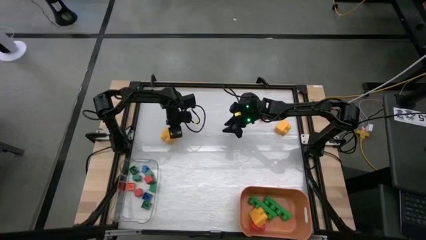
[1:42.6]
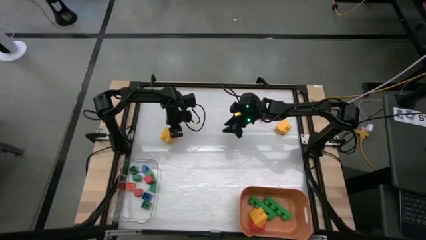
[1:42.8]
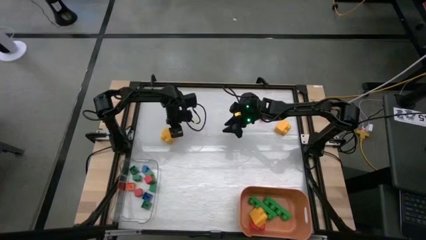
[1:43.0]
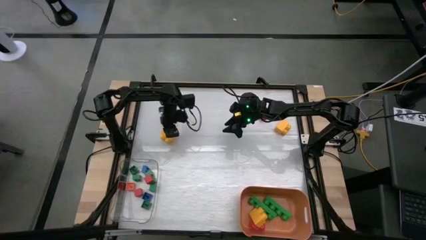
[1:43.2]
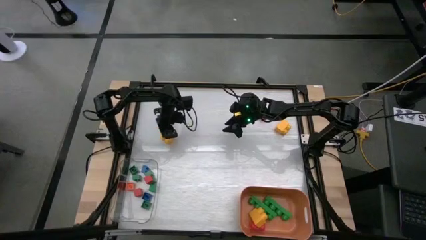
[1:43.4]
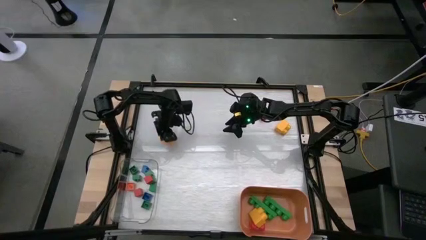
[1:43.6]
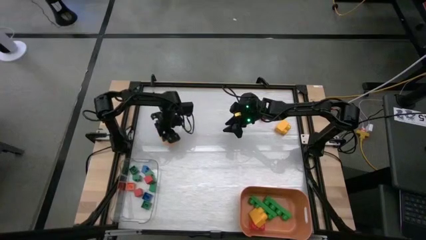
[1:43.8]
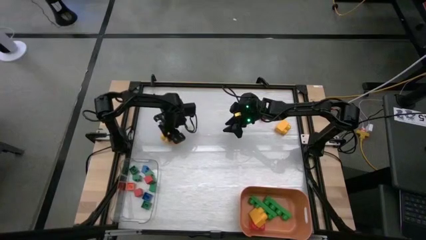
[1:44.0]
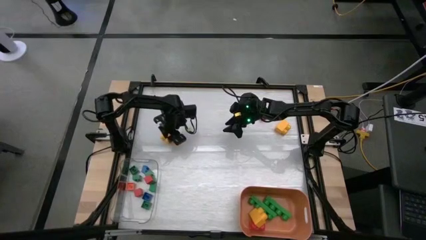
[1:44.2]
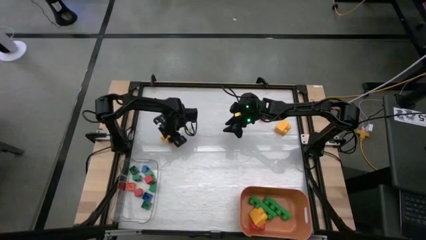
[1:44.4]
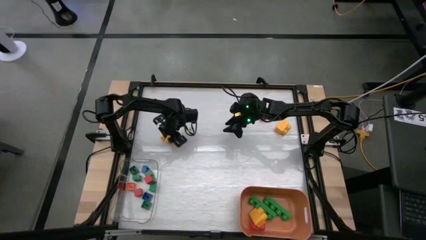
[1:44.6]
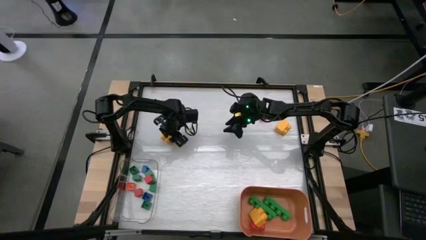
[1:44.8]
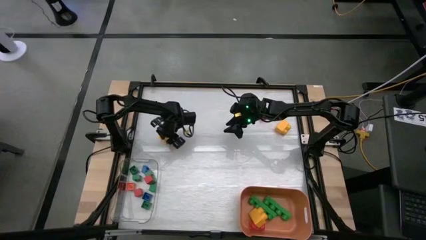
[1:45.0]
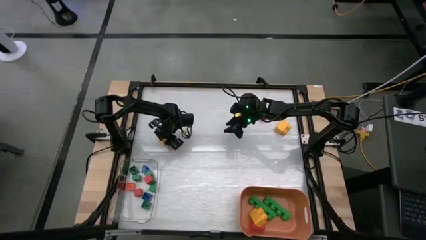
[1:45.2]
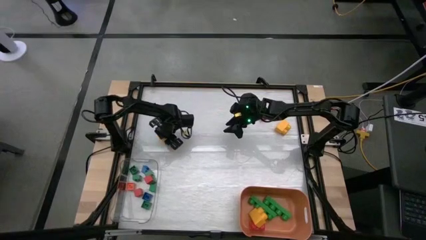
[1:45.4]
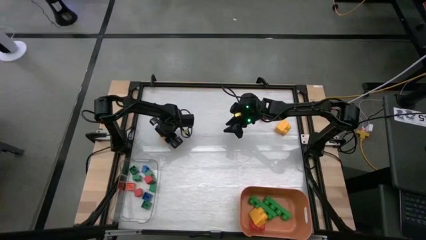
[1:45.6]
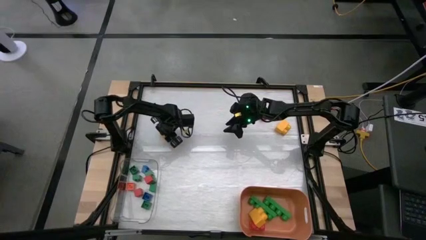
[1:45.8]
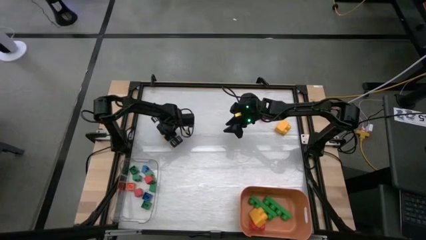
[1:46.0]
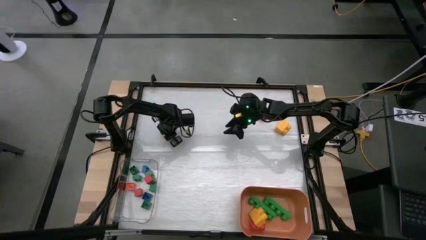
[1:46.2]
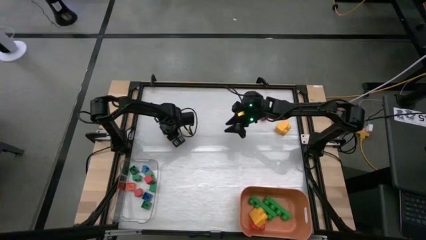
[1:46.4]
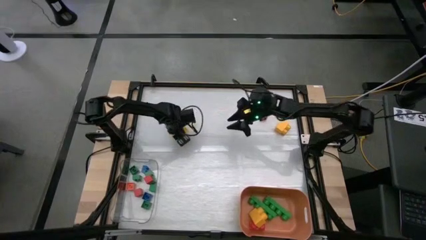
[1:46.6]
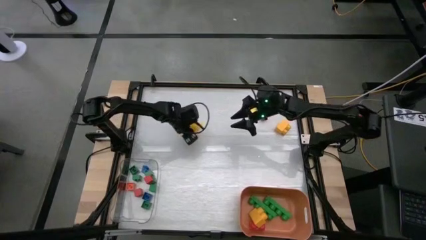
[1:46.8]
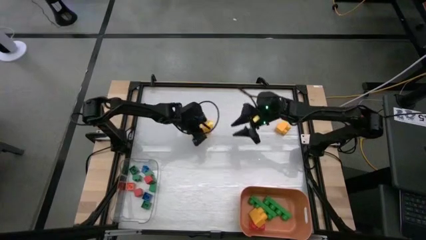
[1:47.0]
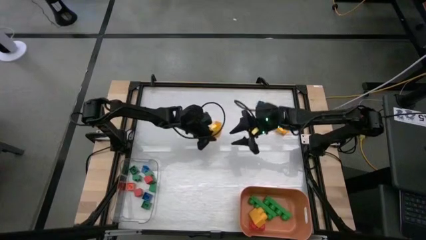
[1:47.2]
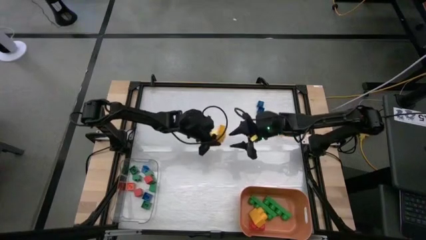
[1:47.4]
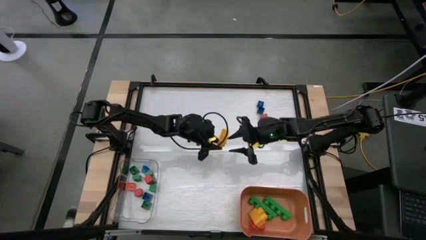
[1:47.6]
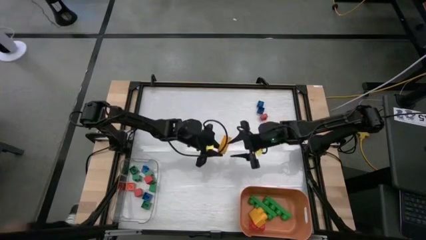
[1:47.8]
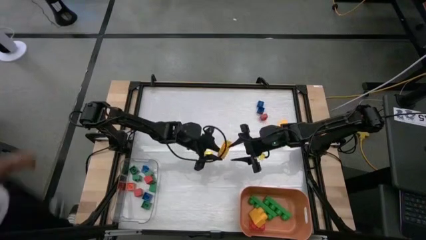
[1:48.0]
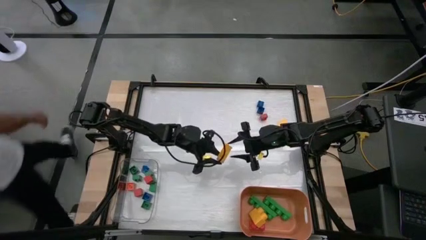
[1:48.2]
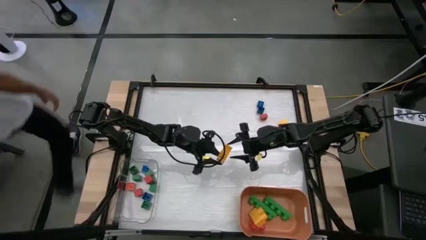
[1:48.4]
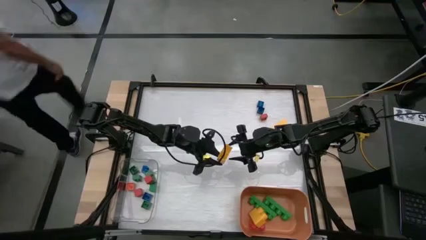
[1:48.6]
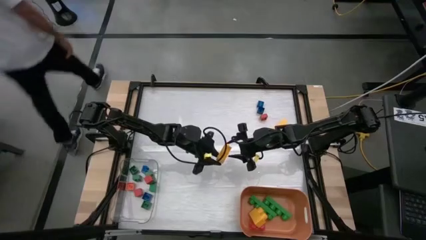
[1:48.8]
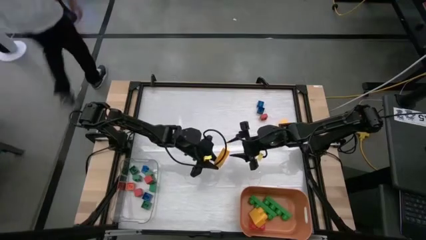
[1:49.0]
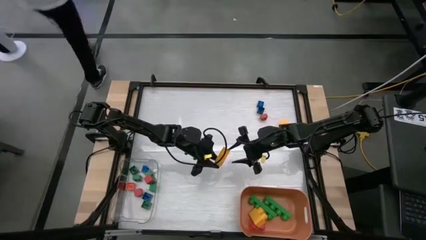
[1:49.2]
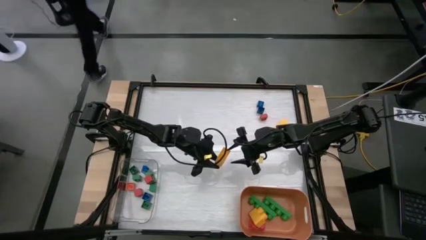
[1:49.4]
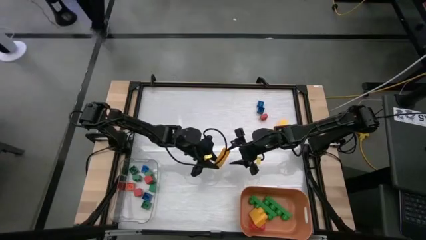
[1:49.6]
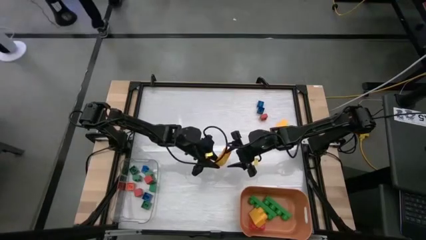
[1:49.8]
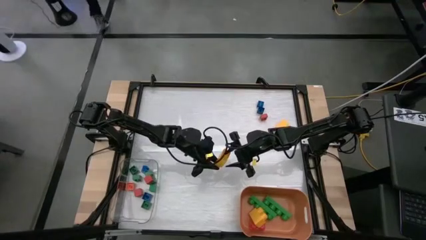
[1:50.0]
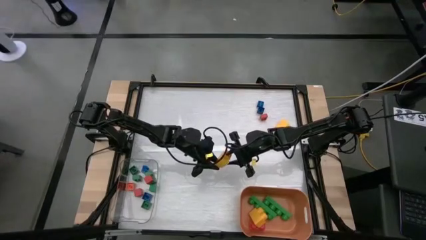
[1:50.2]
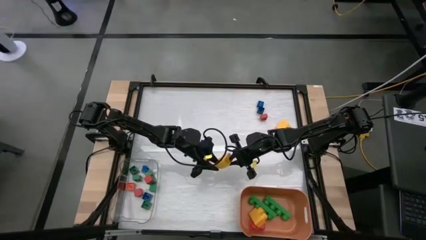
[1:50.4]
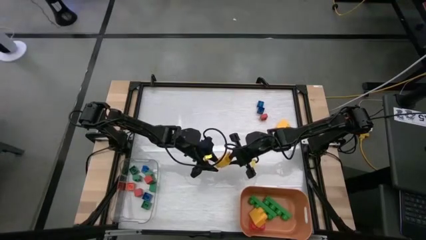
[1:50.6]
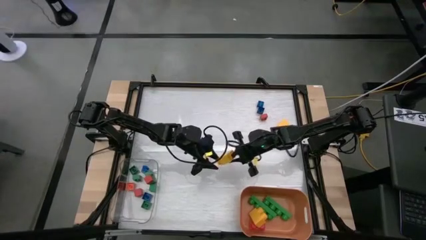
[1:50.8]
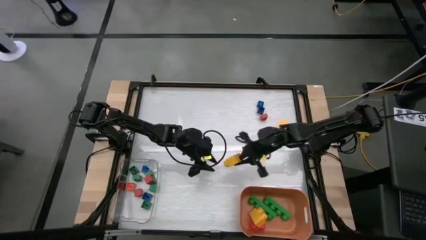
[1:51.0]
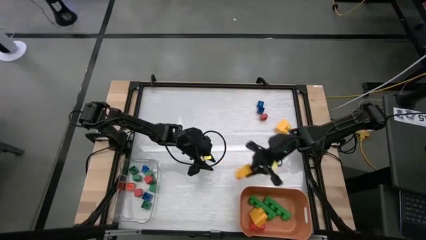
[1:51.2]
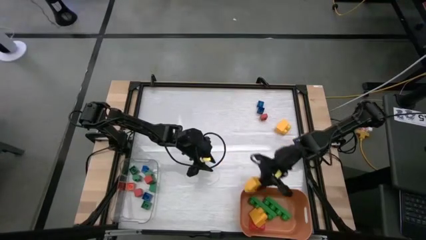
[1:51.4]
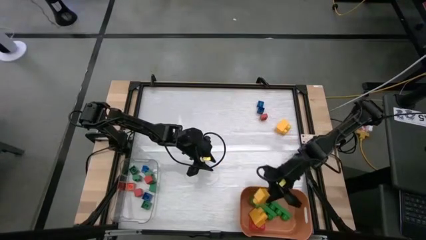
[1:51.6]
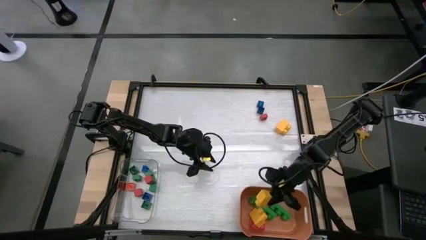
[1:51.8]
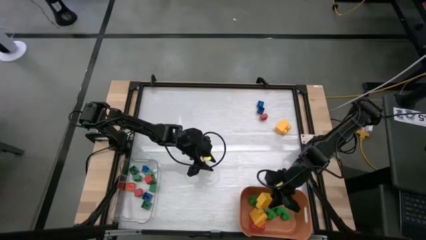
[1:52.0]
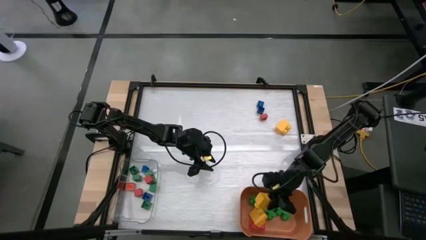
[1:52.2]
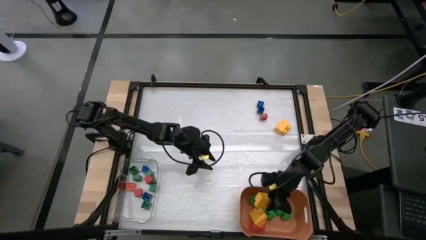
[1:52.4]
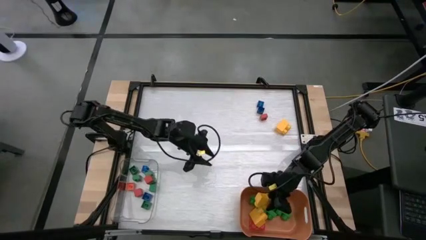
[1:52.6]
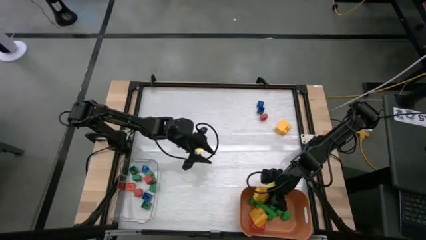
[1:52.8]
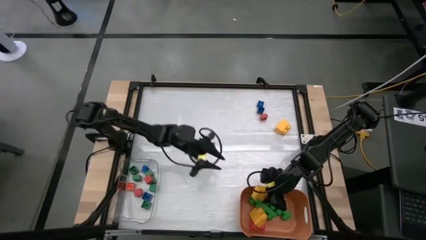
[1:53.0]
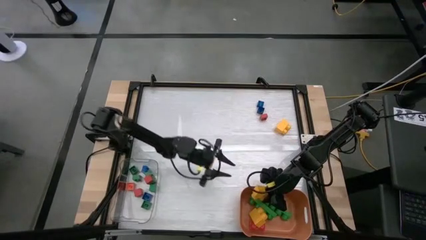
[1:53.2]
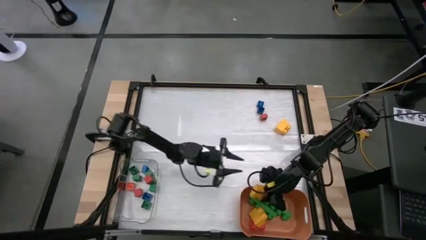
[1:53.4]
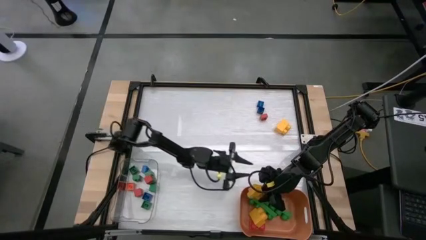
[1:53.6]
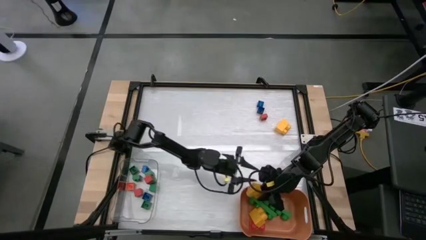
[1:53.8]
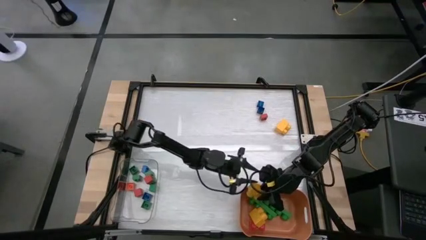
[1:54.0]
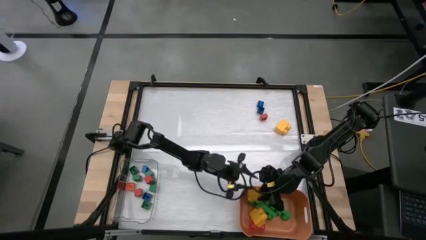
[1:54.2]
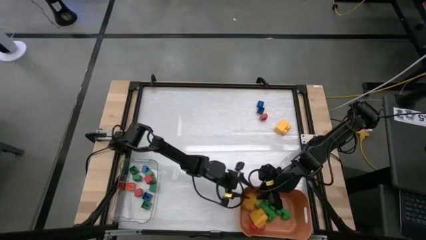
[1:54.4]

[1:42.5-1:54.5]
Task: Sort blocks by size
Put the big yellow game piece into the orange bin
